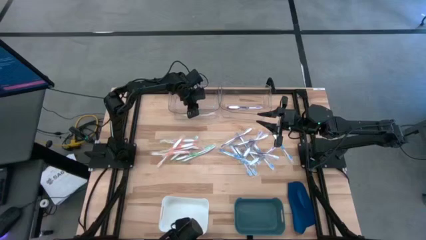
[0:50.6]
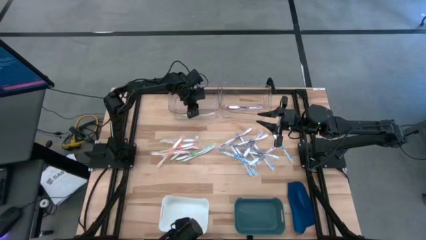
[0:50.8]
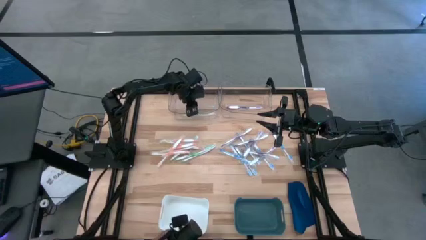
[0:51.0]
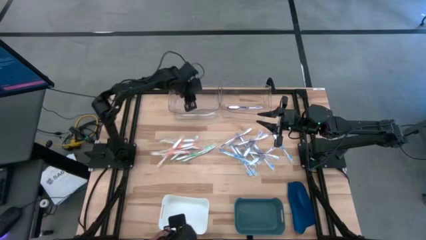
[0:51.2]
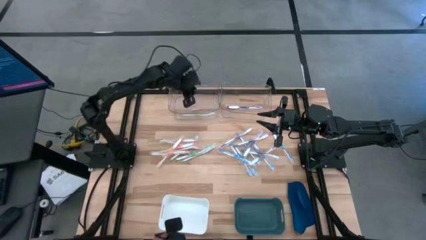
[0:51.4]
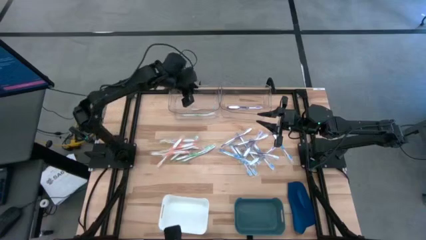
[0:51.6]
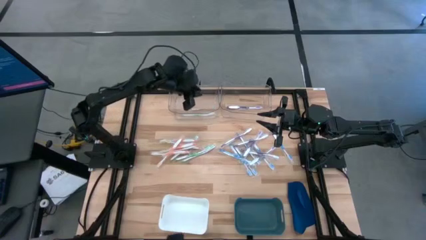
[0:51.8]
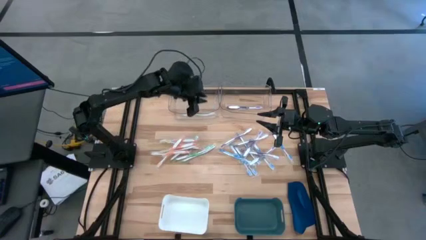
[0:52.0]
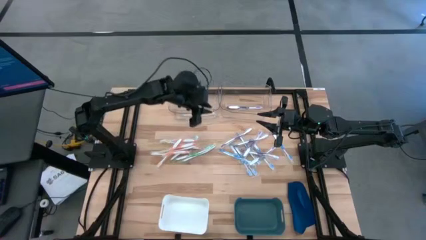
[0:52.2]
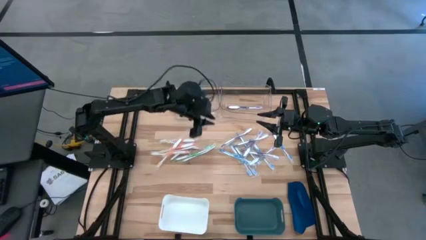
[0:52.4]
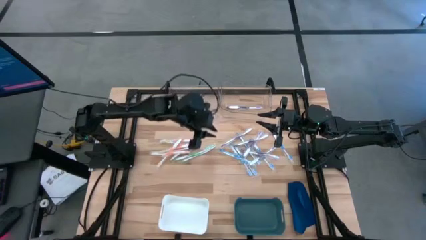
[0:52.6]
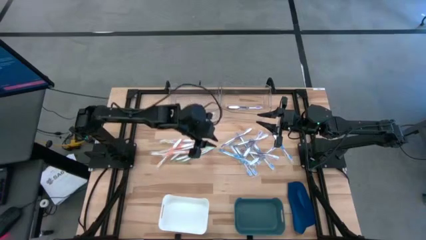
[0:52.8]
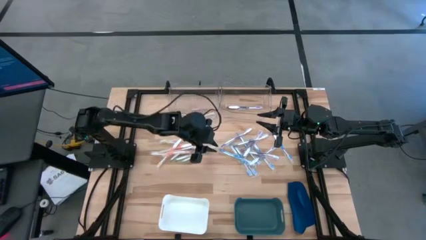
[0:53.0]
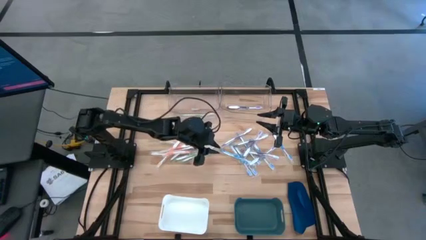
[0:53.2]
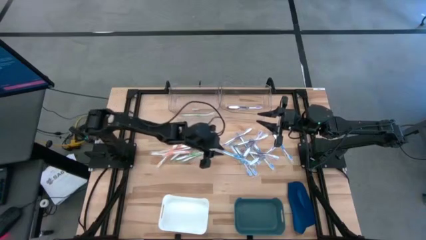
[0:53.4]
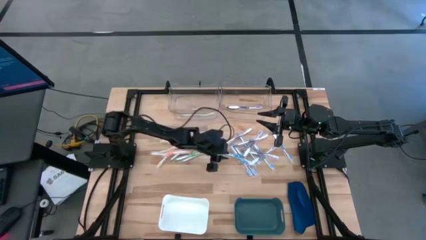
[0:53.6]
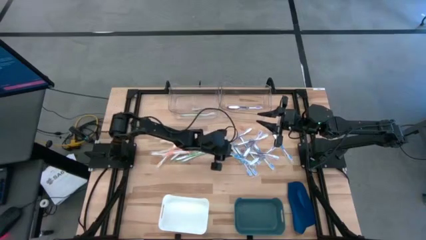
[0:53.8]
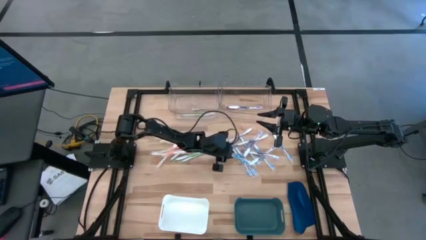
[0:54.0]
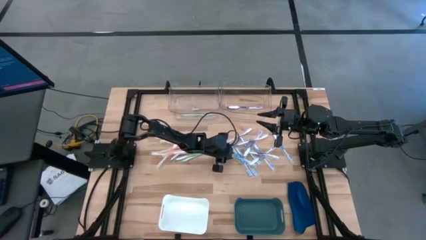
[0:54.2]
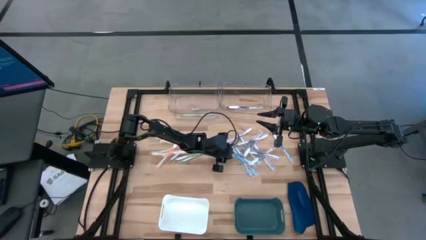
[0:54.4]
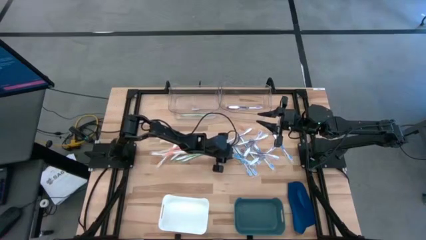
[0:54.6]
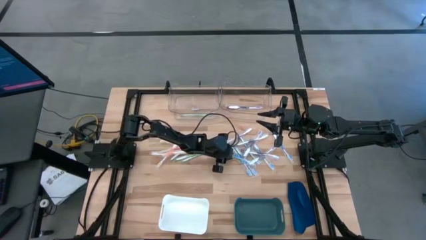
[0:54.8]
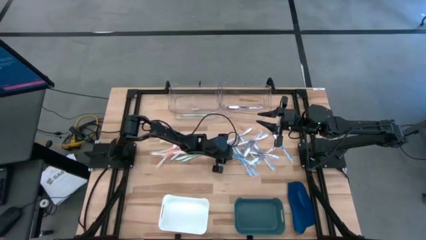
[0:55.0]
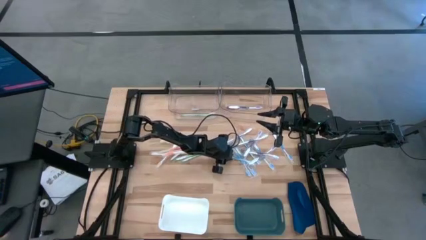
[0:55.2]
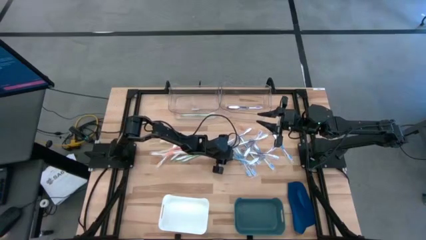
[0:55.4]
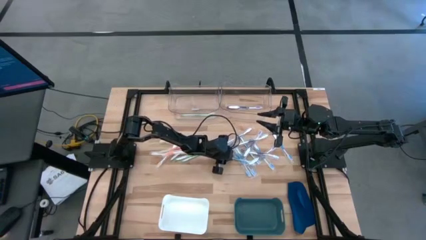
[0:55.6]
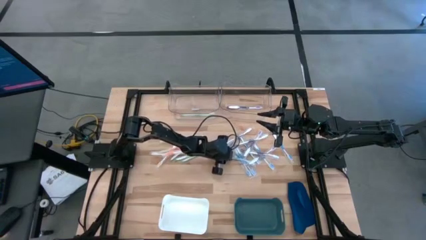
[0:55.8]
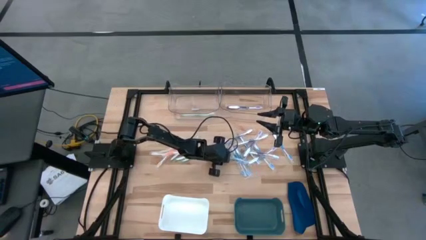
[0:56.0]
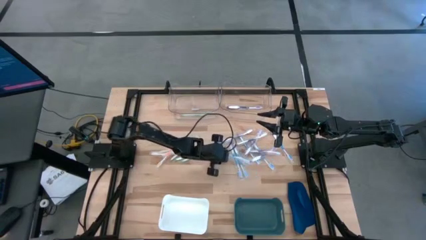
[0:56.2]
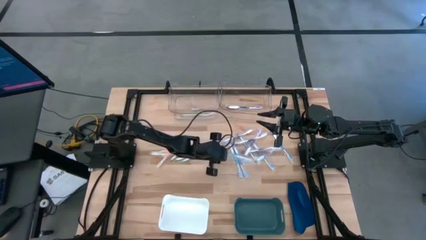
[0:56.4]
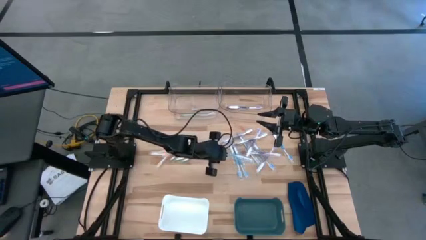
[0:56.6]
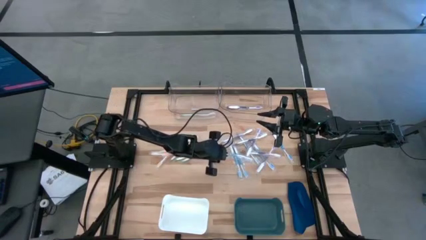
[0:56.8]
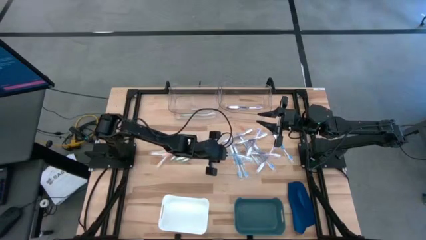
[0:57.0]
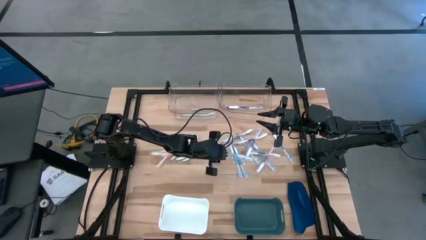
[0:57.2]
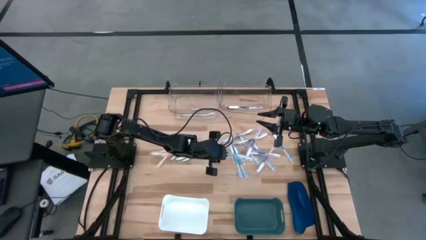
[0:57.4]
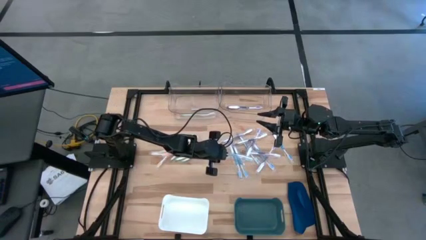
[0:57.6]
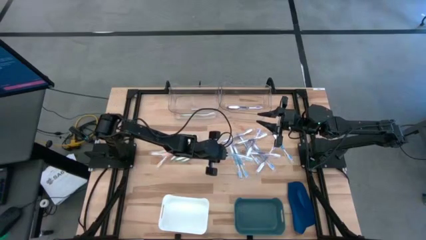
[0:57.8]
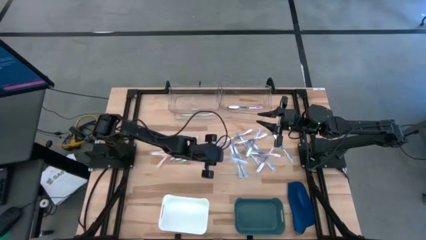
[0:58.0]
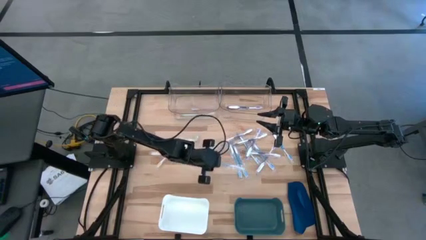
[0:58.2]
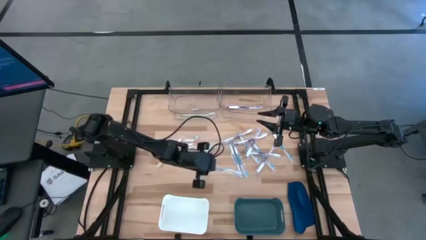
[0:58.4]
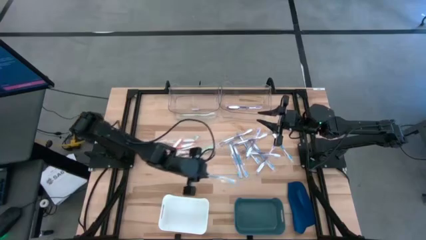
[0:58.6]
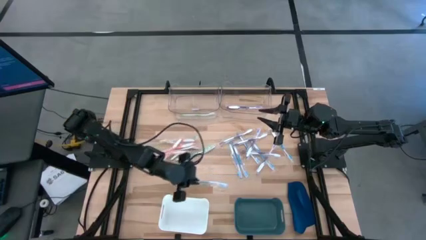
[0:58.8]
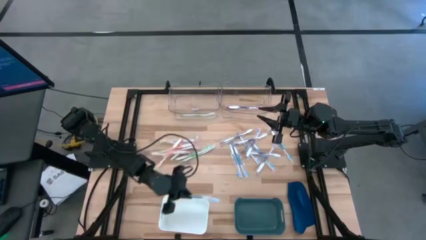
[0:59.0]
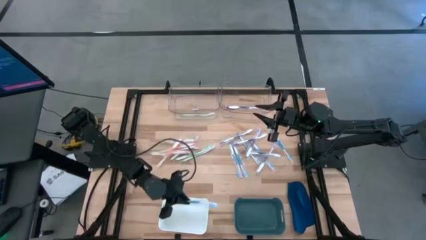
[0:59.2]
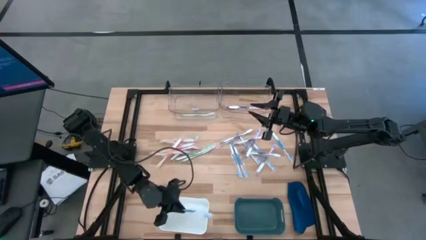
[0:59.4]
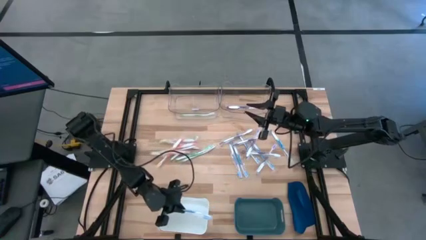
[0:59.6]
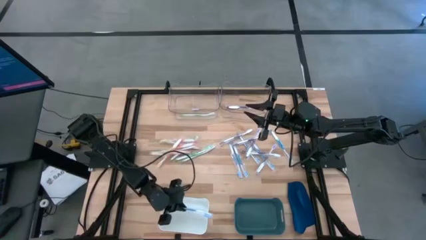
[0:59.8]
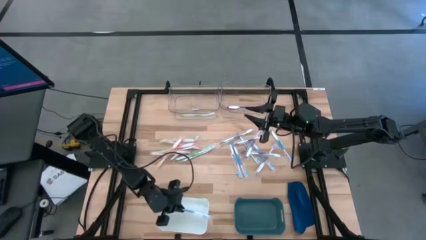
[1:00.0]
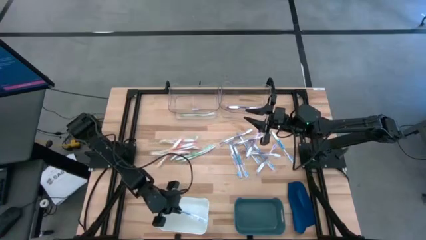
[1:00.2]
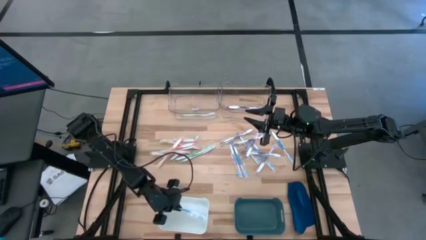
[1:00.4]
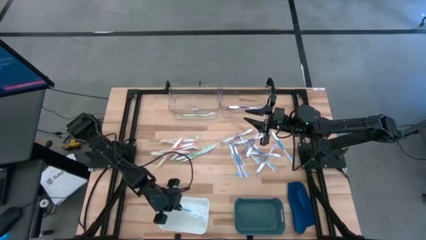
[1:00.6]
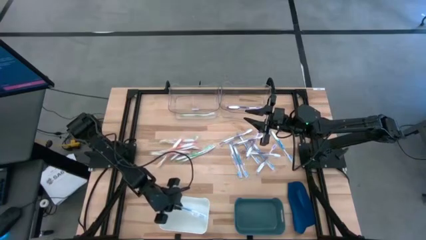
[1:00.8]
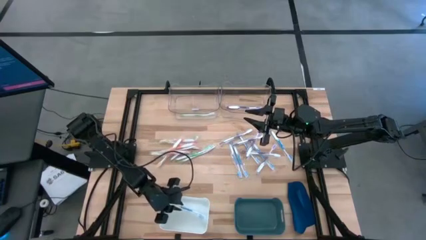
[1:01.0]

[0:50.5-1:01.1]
Task: Pick & Place Toothbrushes
Put the blue toothbrush into the white bin

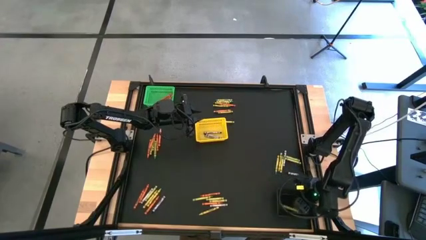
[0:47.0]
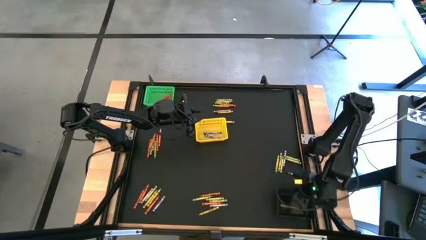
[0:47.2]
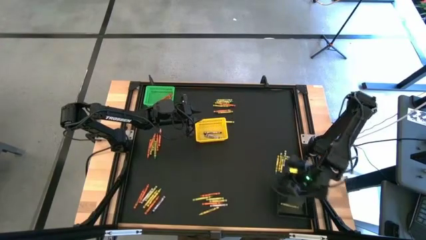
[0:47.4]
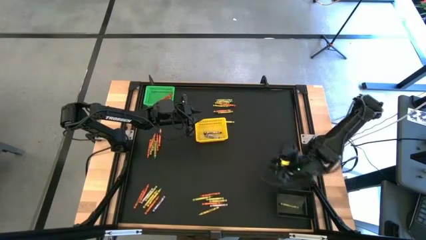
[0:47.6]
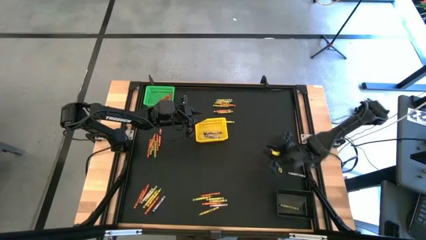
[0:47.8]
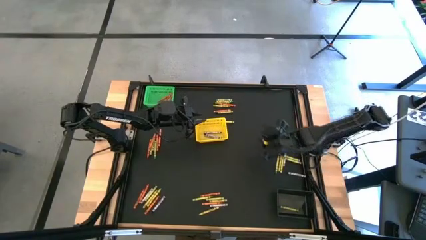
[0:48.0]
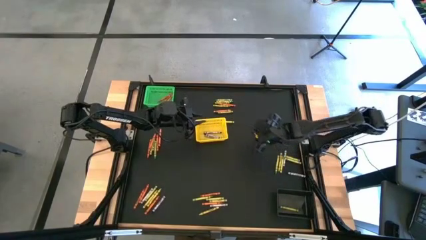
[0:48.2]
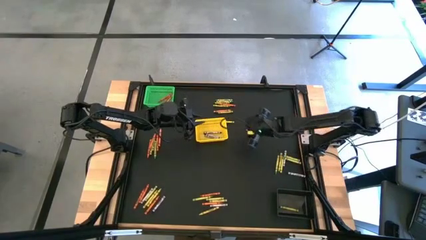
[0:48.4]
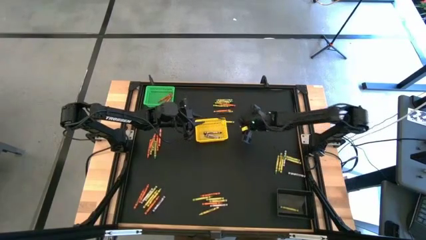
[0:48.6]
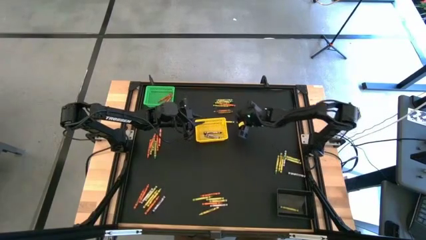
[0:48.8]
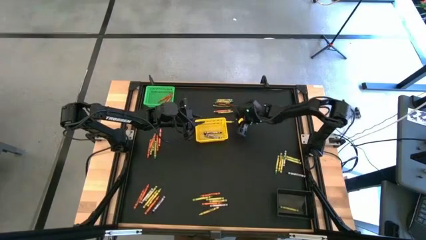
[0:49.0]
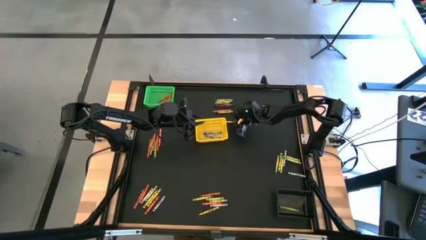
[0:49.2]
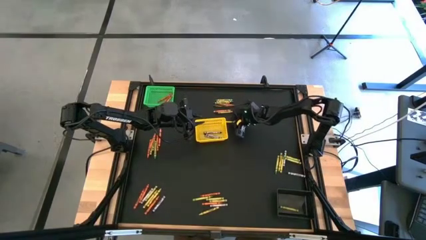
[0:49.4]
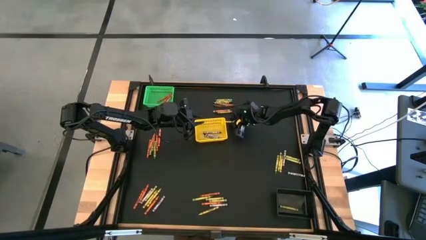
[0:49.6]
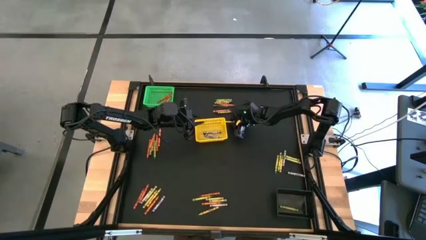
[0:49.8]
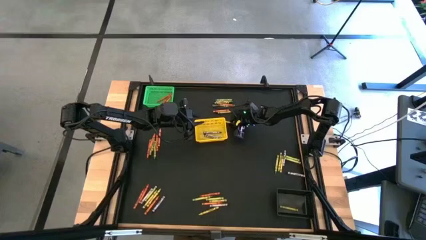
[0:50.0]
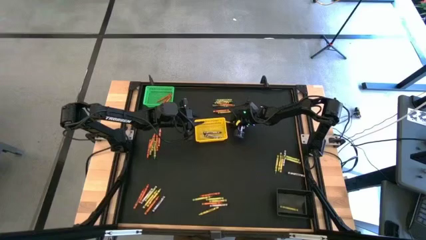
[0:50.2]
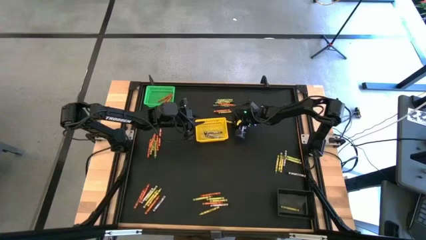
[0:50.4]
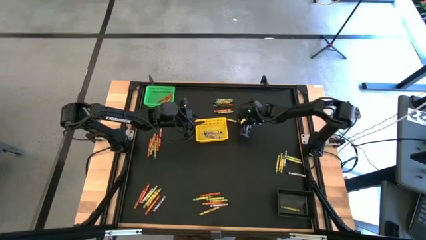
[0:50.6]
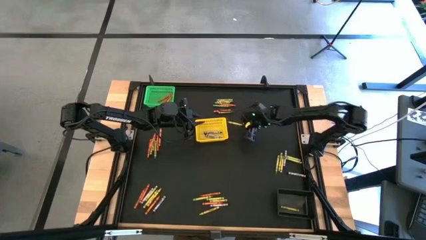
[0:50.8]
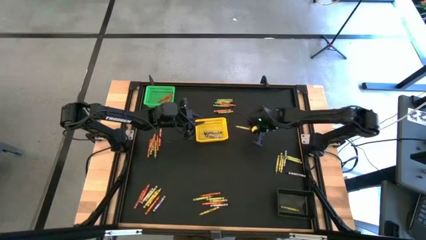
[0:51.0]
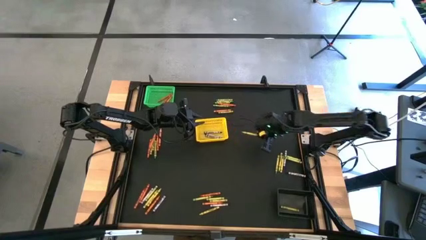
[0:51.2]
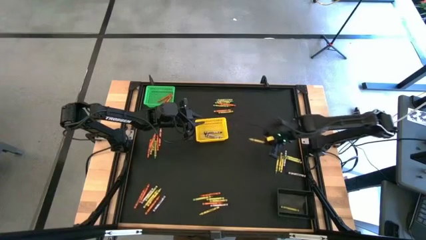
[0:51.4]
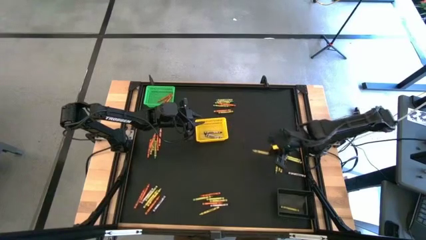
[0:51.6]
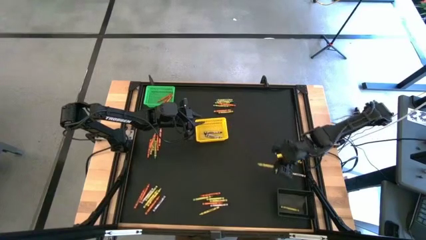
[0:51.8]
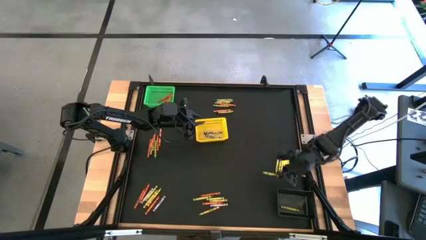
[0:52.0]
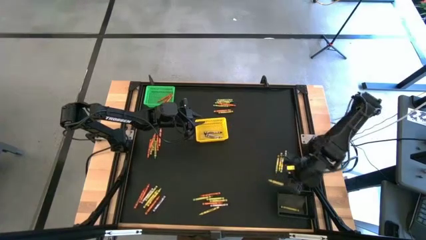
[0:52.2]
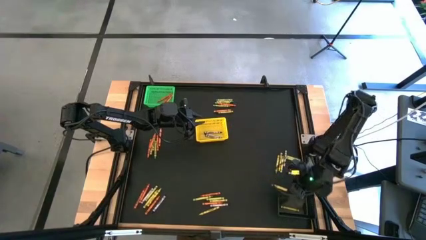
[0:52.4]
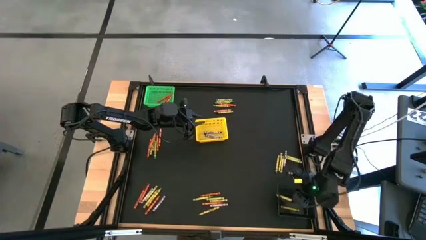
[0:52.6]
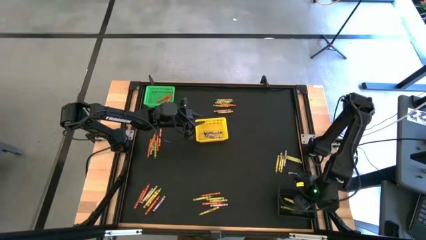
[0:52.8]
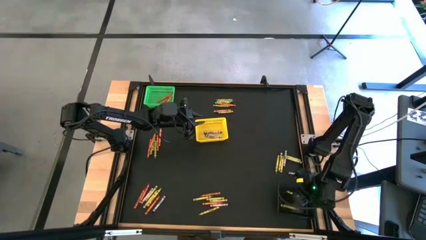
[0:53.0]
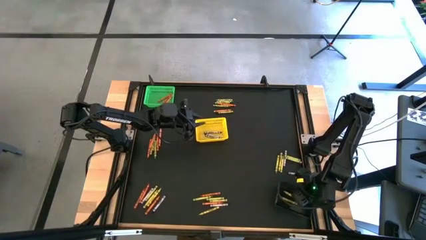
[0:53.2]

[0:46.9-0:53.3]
Task: Sort crayons
Put the green crayon into the black bin
